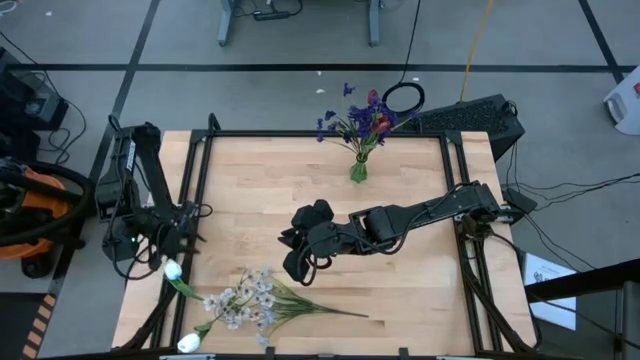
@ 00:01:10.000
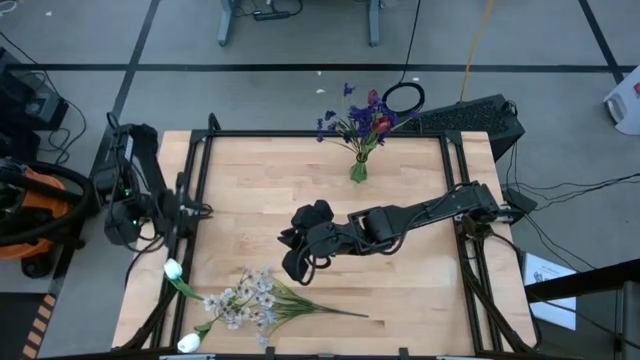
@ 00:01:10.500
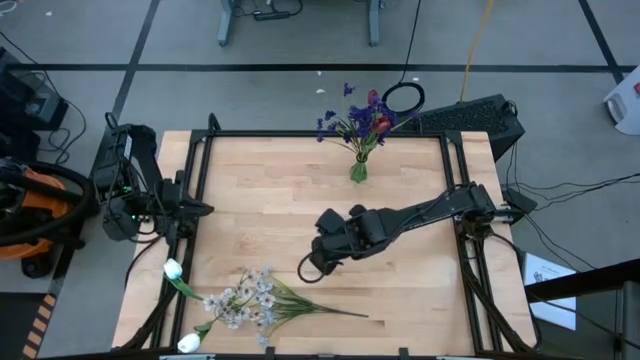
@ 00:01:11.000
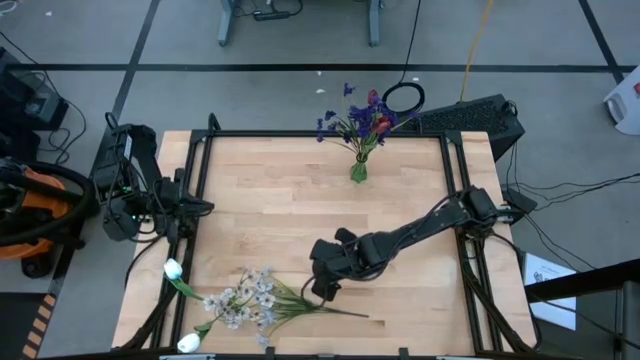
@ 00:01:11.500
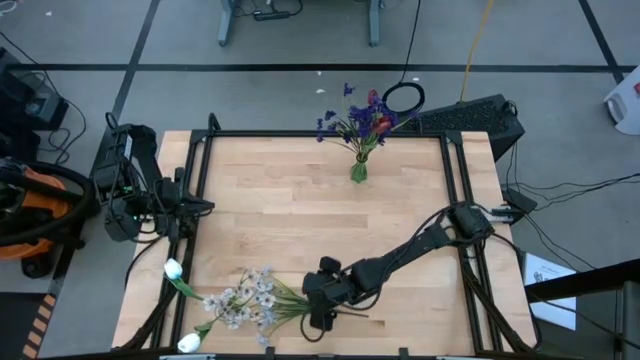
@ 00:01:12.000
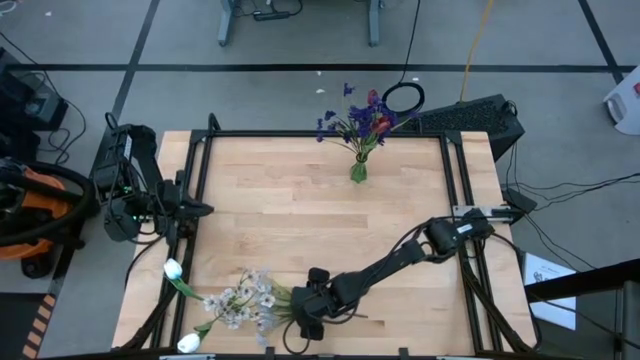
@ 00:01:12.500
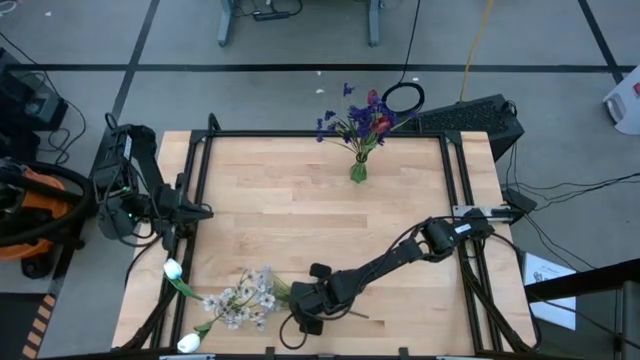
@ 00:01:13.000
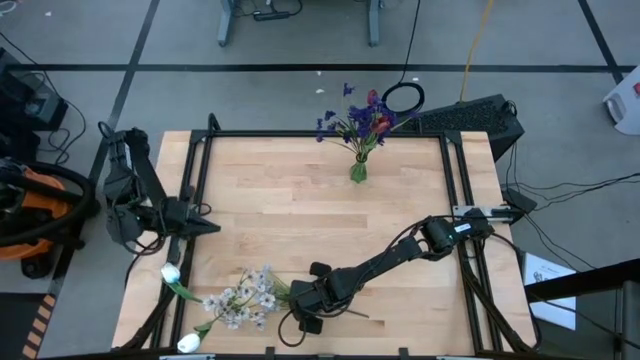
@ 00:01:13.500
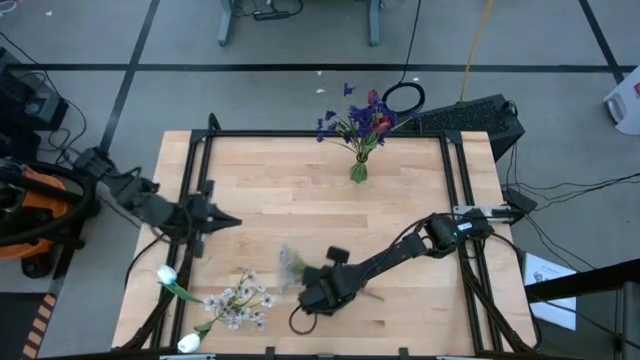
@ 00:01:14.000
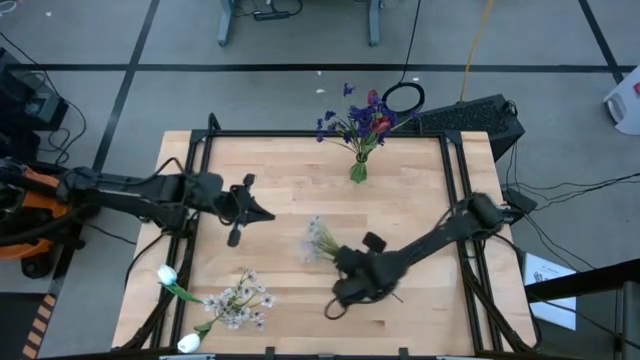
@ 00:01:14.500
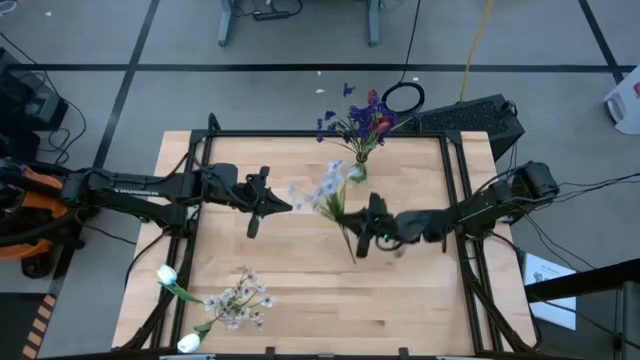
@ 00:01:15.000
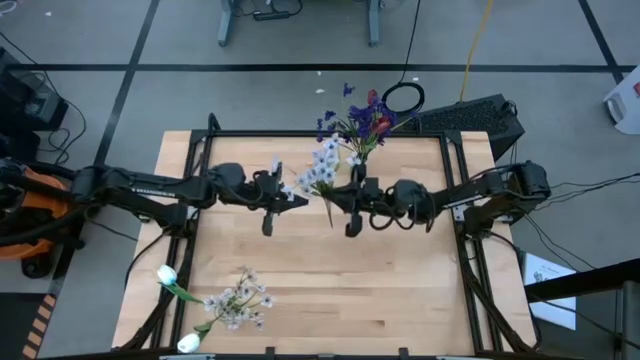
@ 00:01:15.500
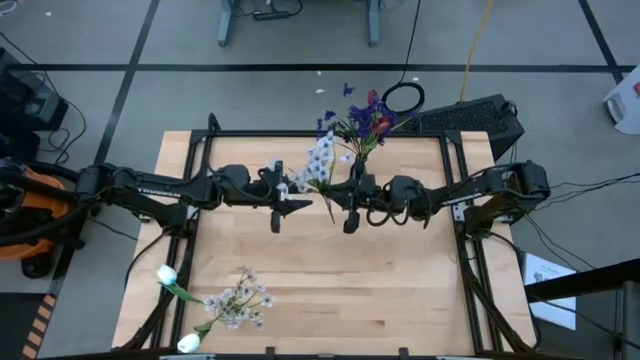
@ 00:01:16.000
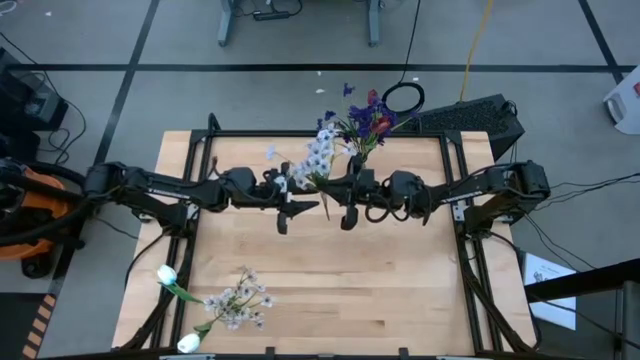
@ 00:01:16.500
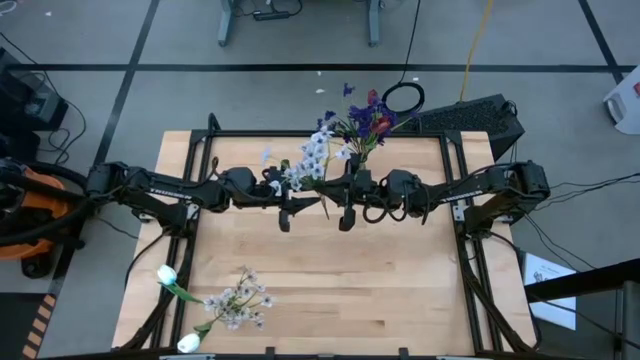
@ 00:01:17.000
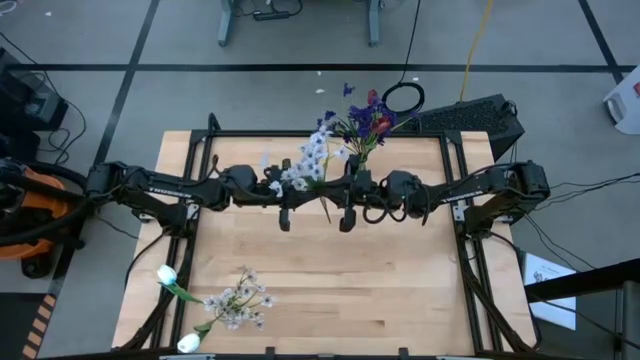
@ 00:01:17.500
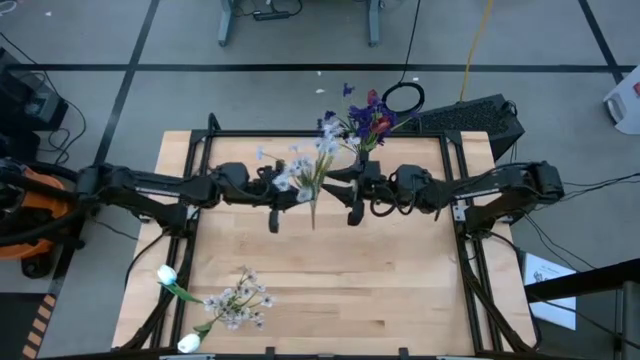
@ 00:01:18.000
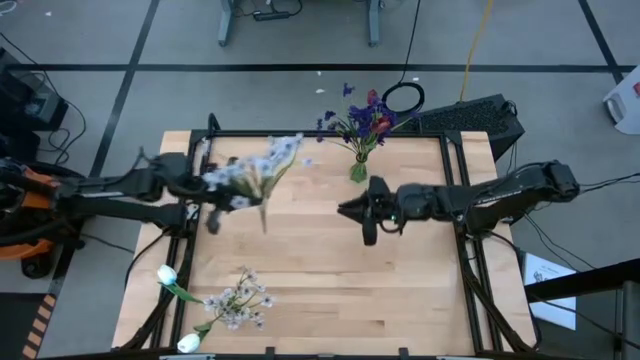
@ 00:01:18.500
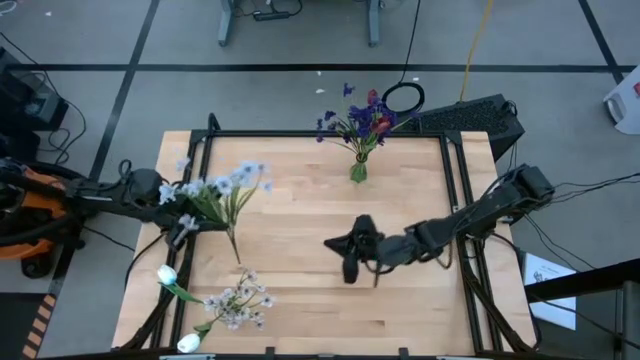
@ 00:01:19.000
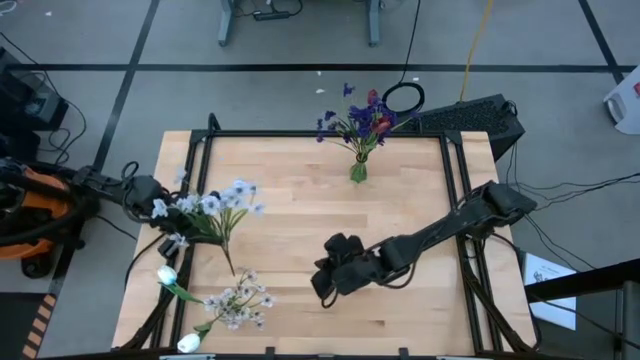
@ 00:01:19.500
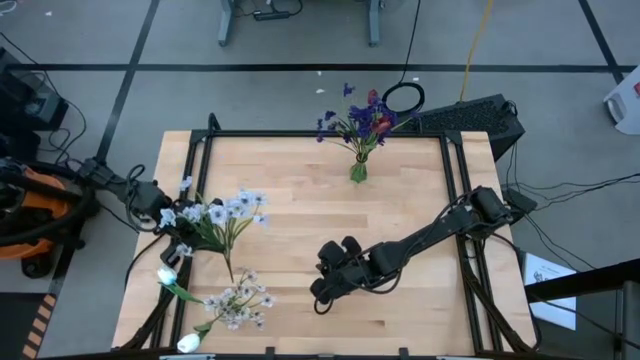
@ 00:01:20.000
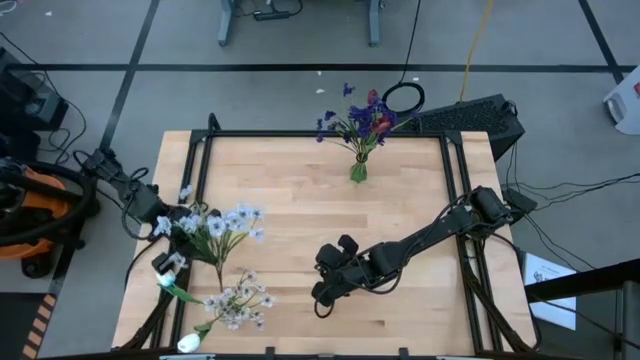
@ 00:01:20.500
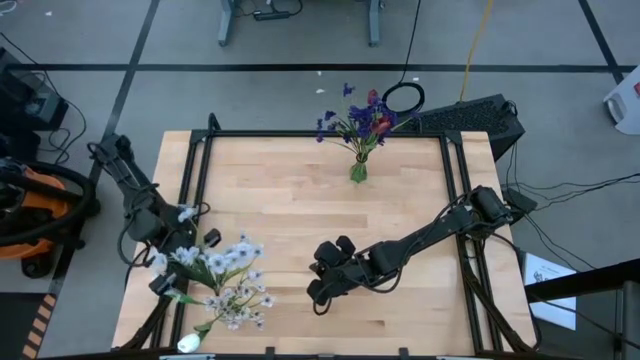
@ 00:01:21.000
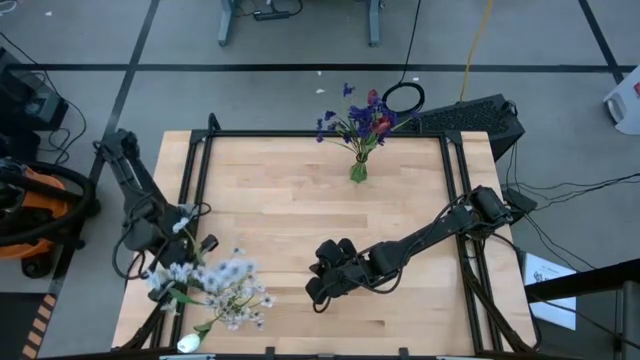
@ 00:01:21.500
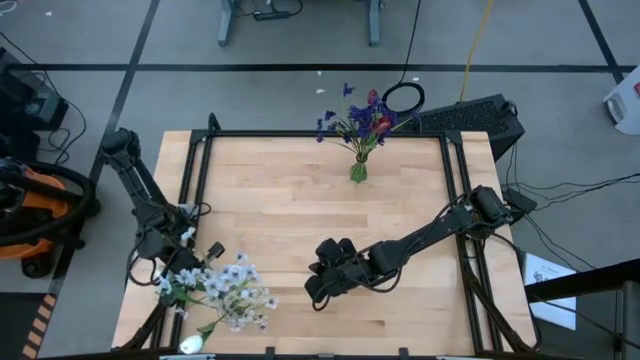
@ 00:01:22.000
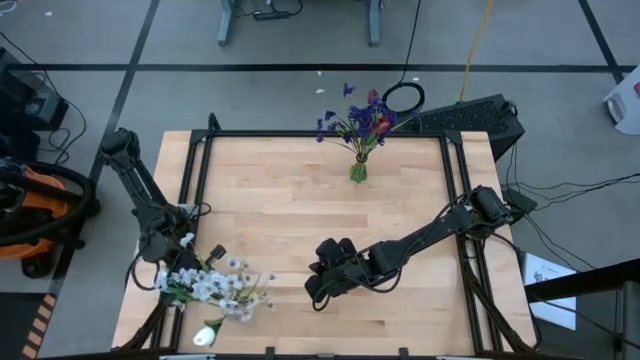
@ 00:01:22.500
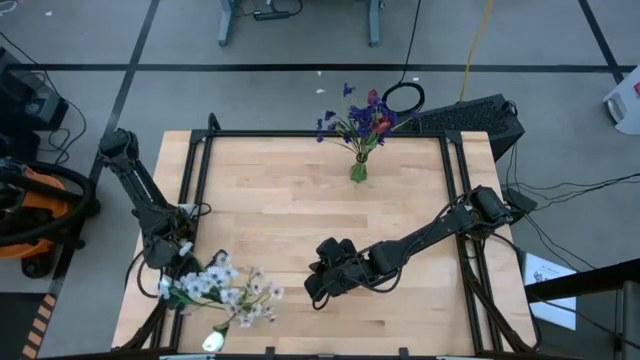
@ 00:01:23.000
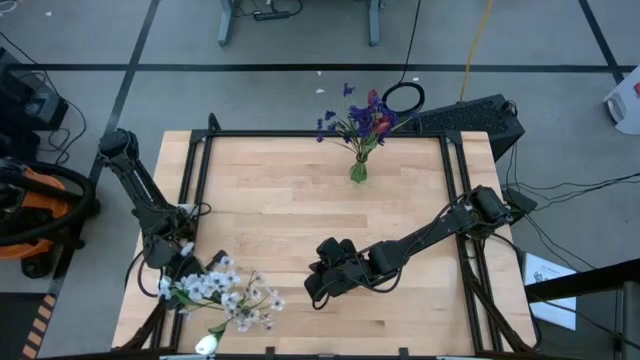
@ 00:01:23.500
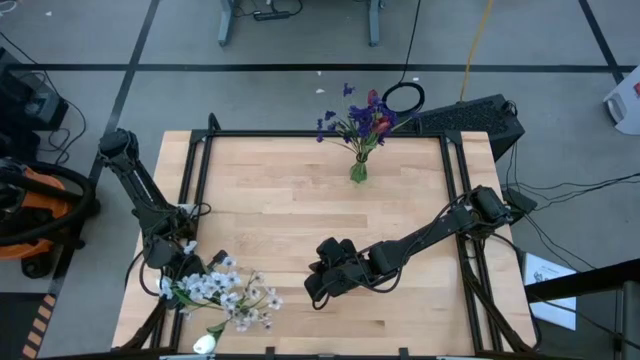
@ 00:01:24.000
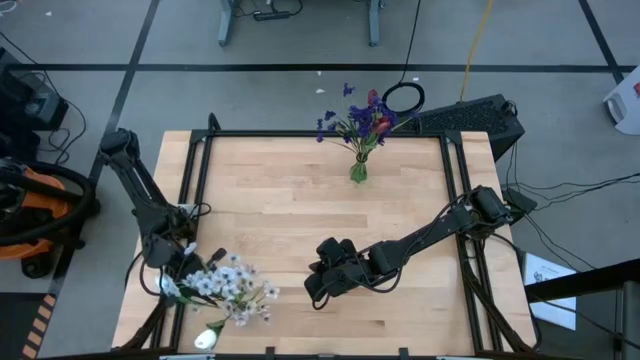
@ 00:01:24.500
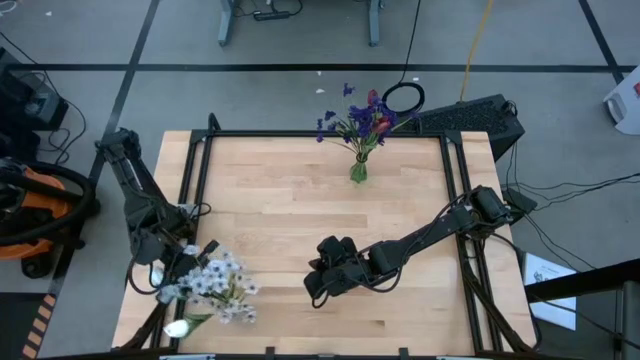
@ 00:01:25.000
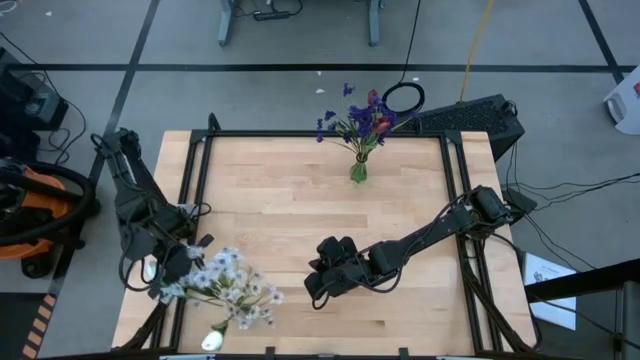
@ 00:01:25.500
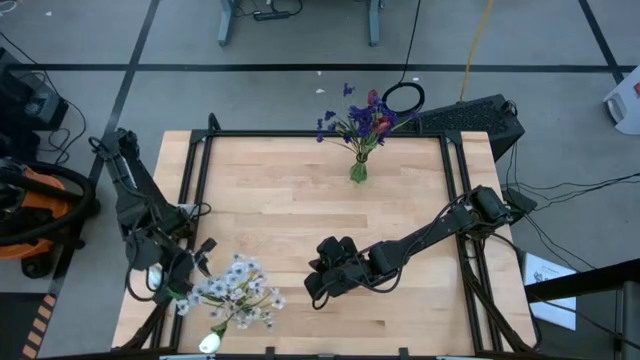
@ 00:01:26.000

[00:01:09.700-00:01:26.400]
Task: Sort flowers into vase by color
Put the white flowers into the transparent flower vase

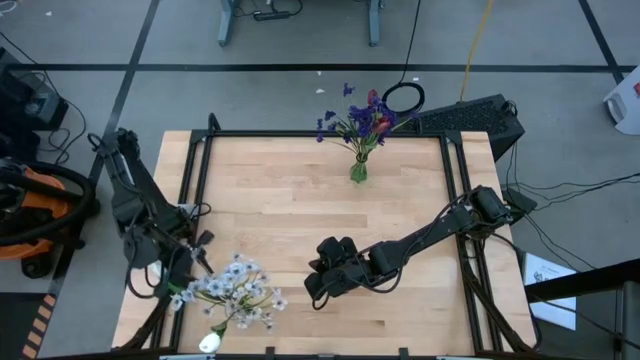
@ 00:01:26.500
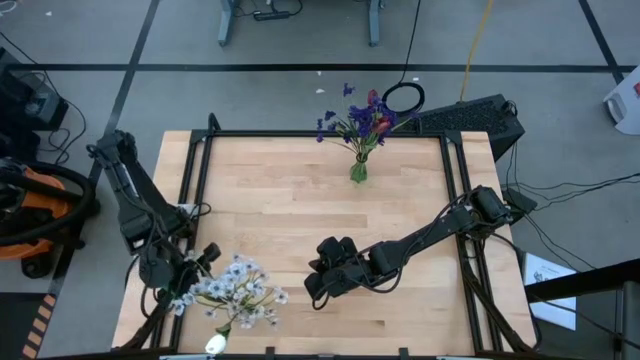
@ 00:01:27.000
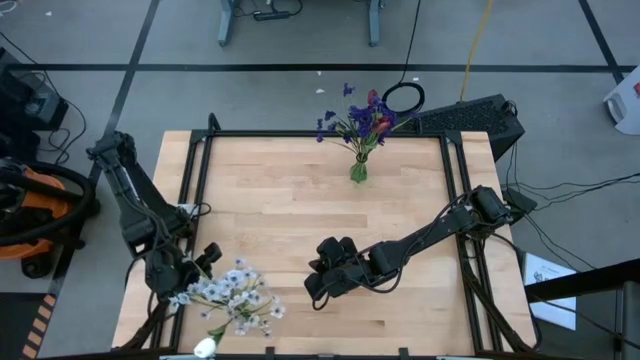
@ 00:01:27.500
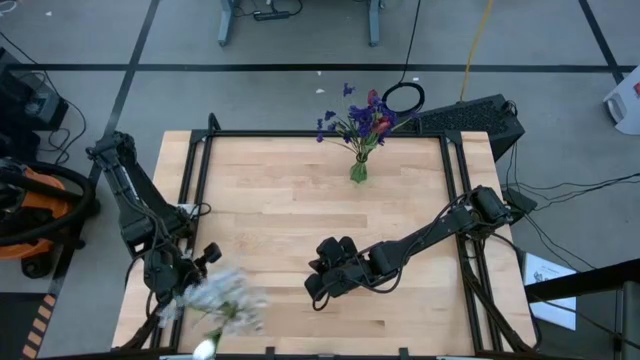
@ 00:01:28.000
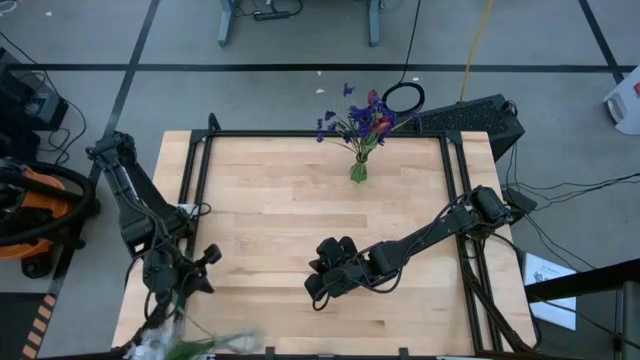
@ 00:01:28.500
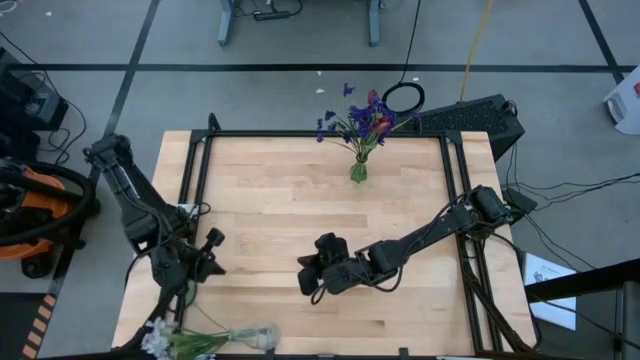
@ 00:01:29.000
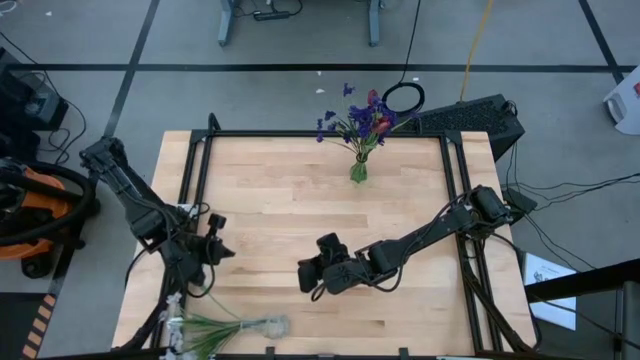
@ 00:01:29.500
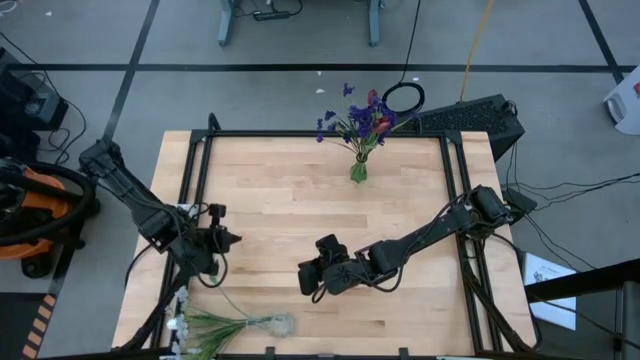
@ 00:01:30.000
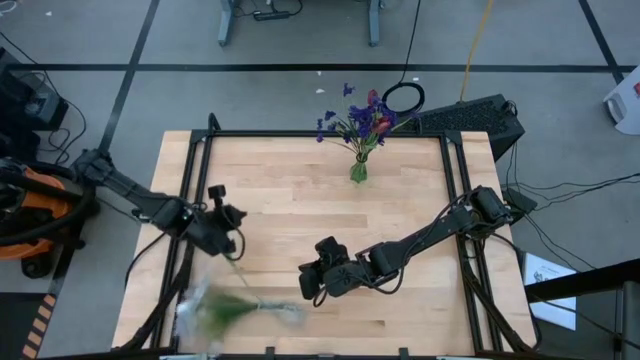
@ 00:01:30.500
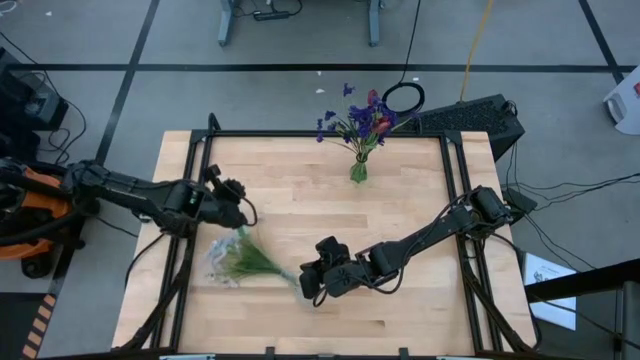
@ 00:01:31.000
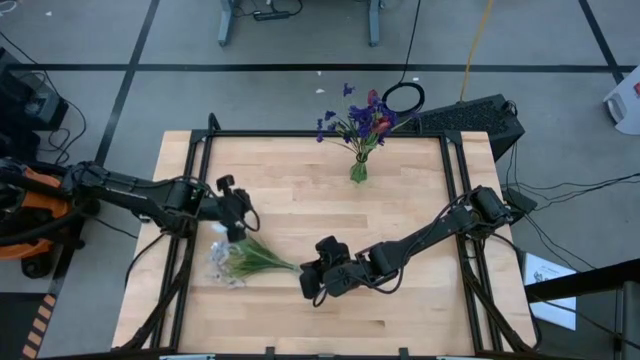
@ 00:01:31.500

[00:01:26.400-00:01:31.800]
Adjust the transparent flower vase
